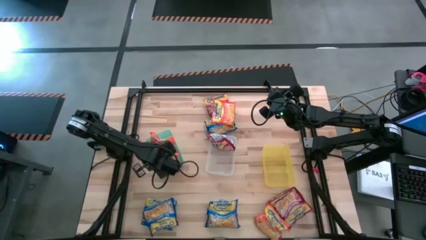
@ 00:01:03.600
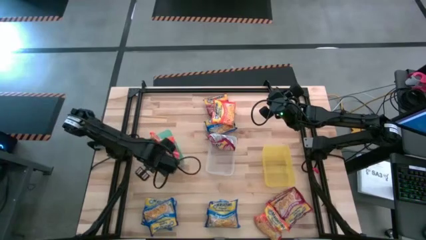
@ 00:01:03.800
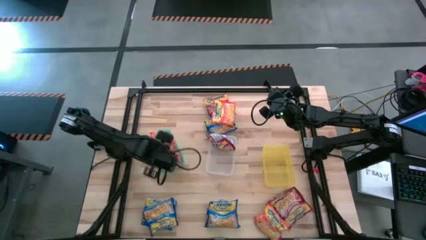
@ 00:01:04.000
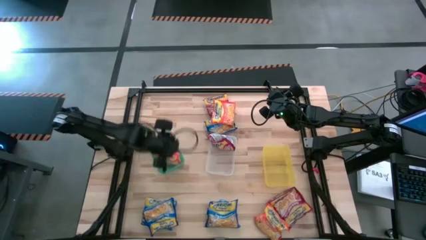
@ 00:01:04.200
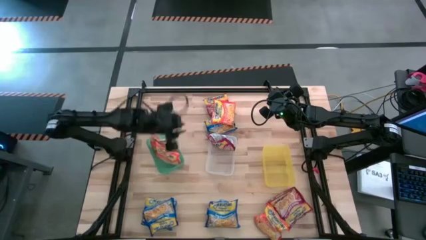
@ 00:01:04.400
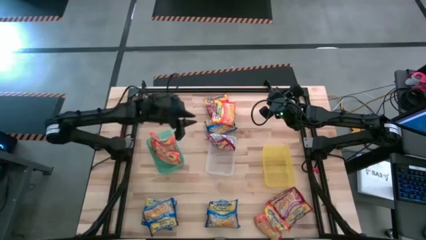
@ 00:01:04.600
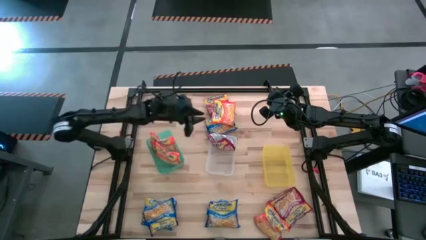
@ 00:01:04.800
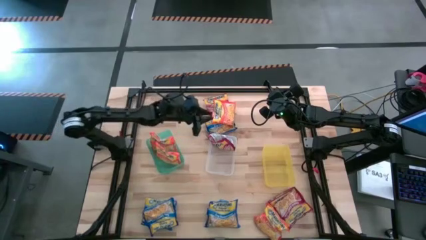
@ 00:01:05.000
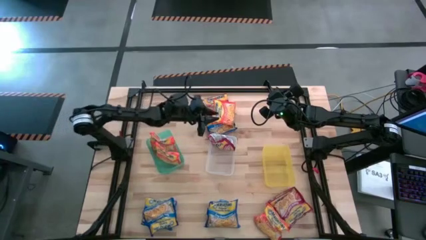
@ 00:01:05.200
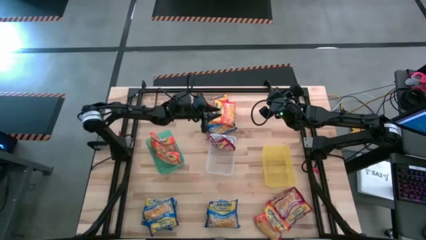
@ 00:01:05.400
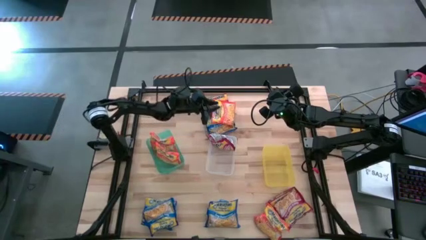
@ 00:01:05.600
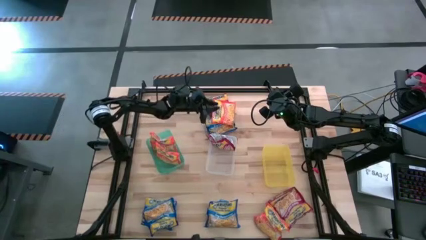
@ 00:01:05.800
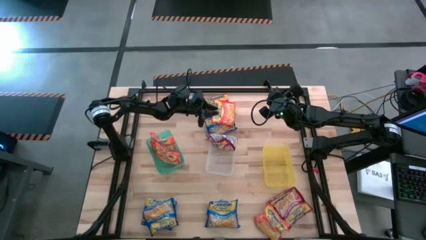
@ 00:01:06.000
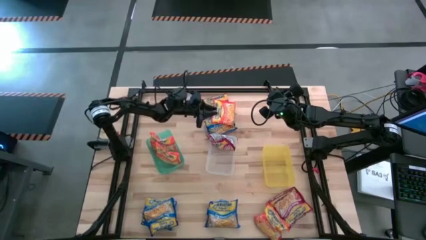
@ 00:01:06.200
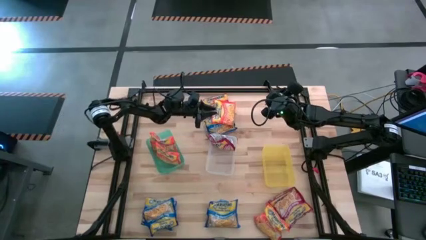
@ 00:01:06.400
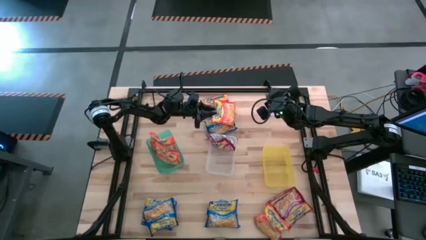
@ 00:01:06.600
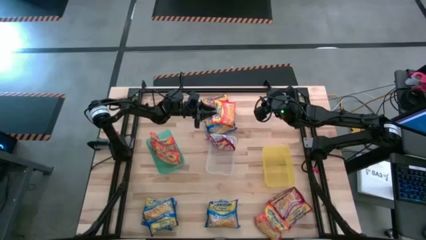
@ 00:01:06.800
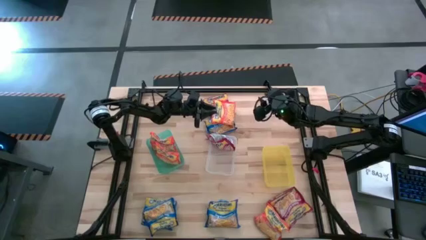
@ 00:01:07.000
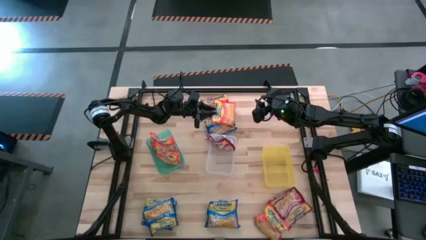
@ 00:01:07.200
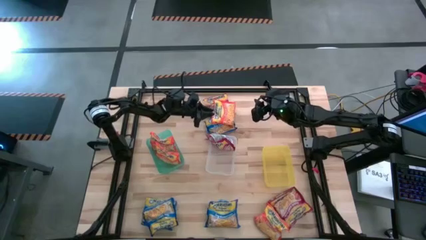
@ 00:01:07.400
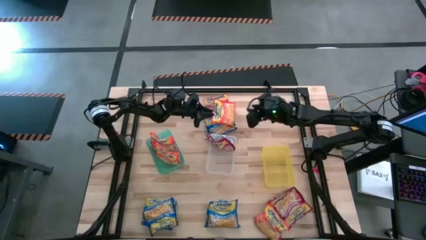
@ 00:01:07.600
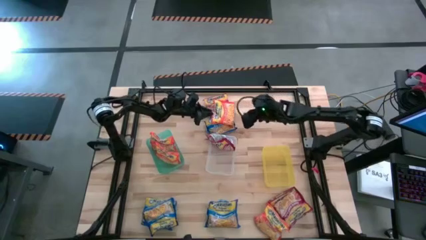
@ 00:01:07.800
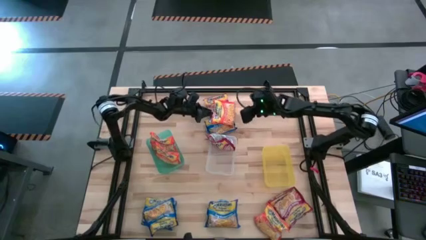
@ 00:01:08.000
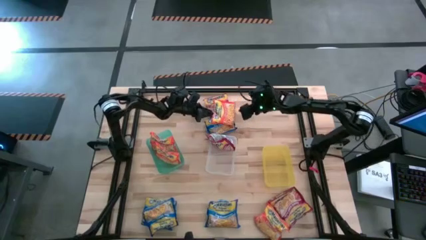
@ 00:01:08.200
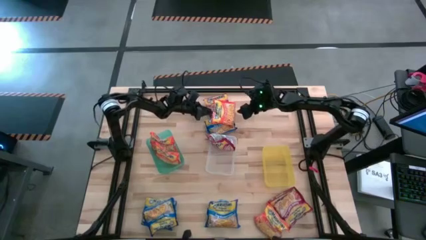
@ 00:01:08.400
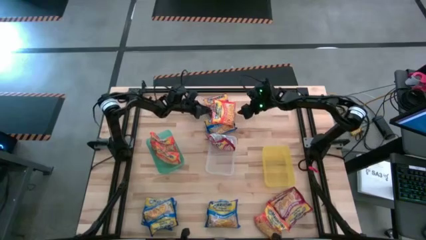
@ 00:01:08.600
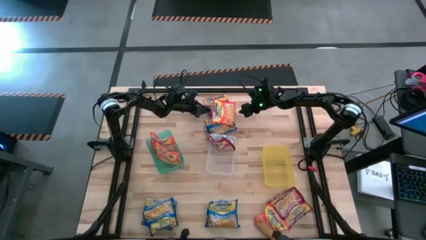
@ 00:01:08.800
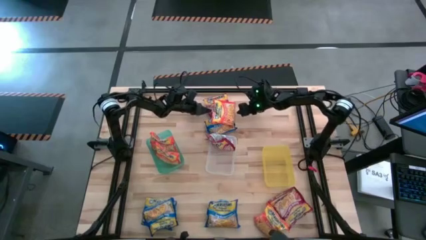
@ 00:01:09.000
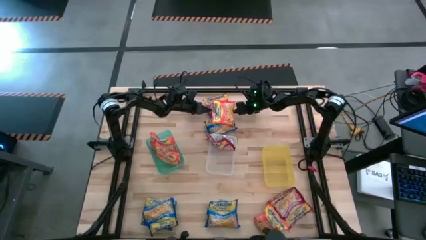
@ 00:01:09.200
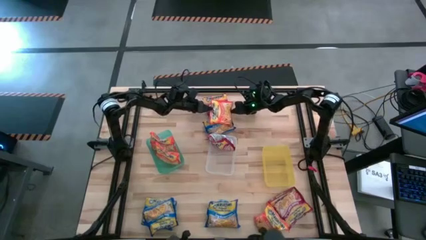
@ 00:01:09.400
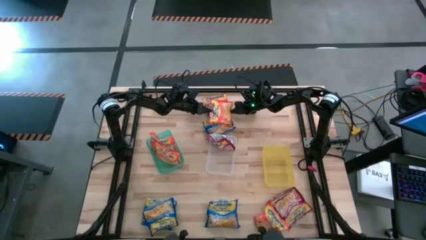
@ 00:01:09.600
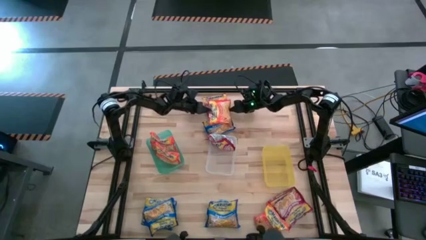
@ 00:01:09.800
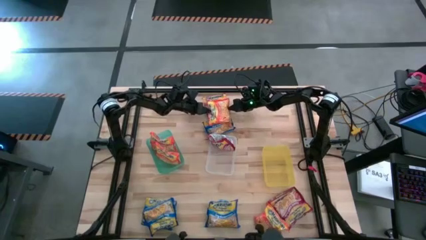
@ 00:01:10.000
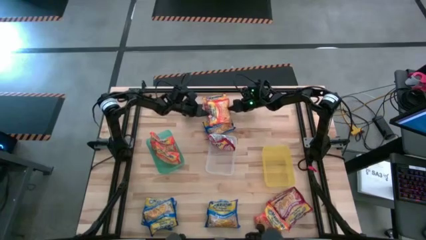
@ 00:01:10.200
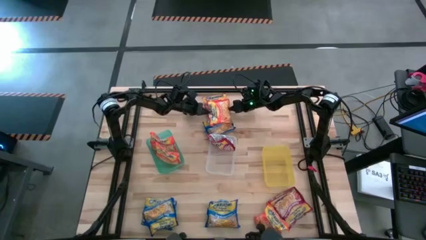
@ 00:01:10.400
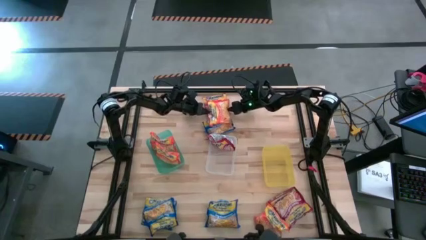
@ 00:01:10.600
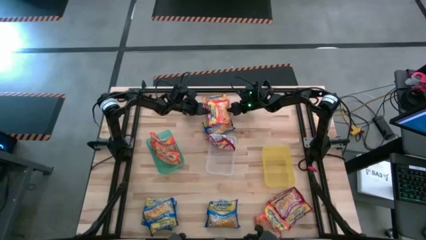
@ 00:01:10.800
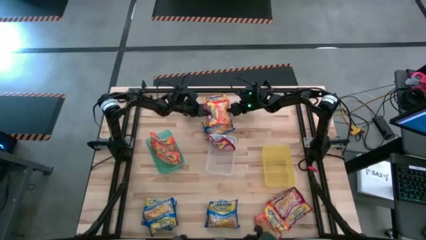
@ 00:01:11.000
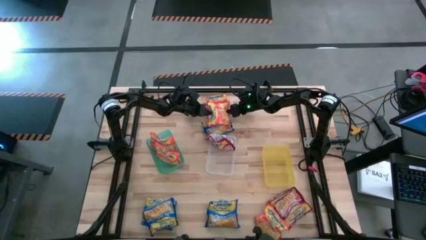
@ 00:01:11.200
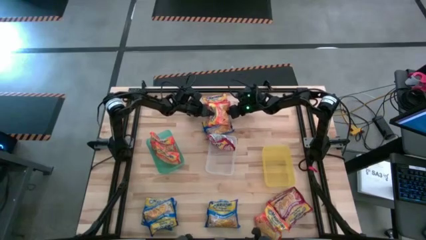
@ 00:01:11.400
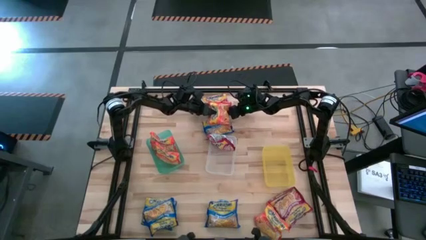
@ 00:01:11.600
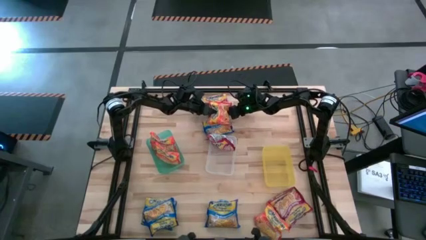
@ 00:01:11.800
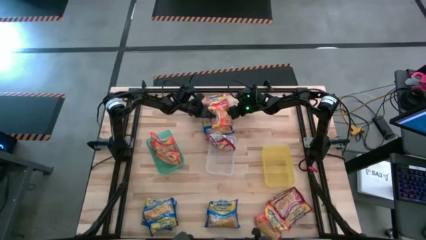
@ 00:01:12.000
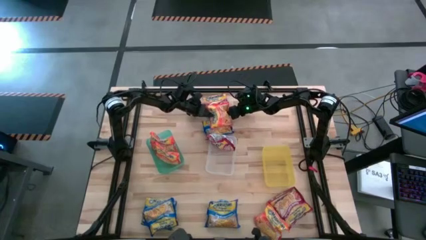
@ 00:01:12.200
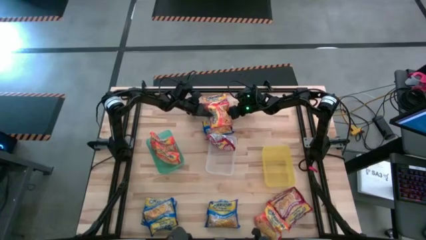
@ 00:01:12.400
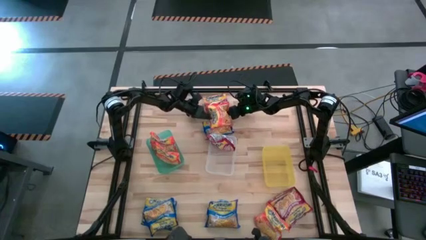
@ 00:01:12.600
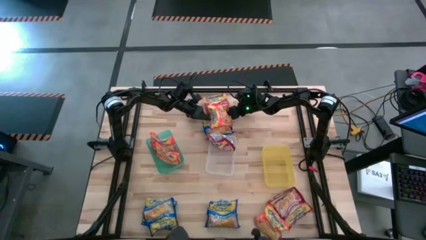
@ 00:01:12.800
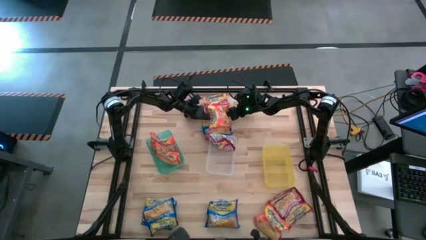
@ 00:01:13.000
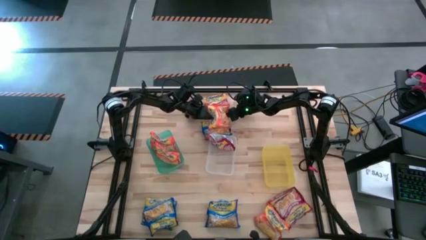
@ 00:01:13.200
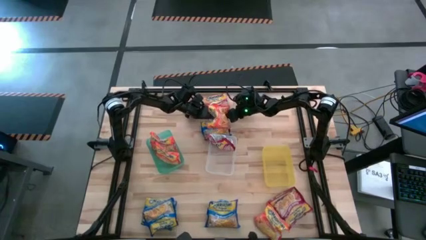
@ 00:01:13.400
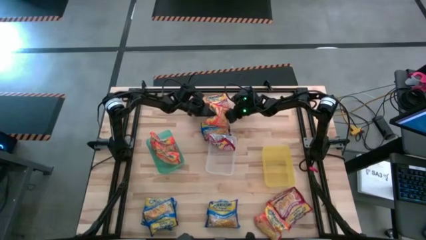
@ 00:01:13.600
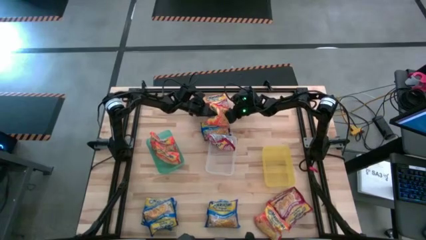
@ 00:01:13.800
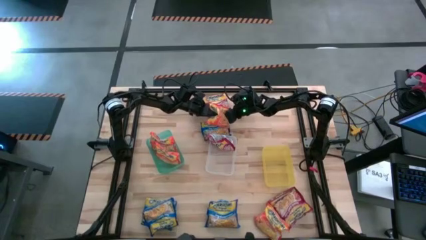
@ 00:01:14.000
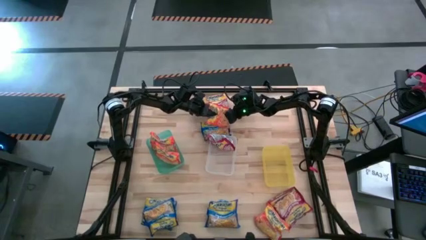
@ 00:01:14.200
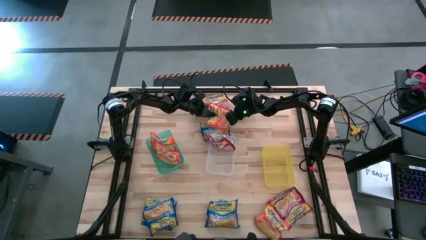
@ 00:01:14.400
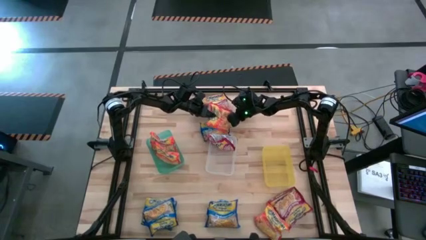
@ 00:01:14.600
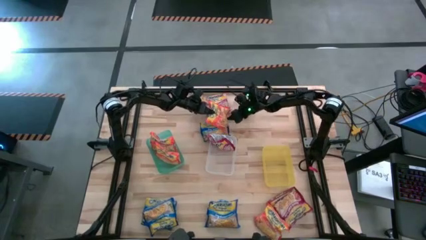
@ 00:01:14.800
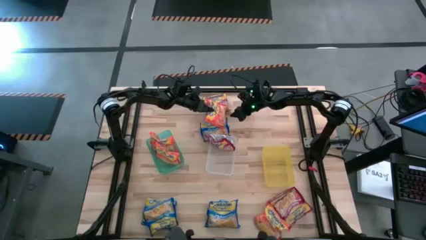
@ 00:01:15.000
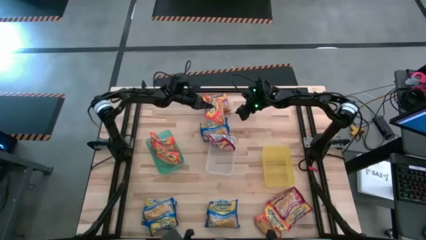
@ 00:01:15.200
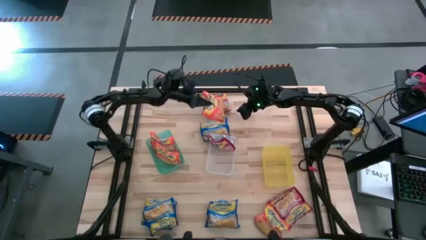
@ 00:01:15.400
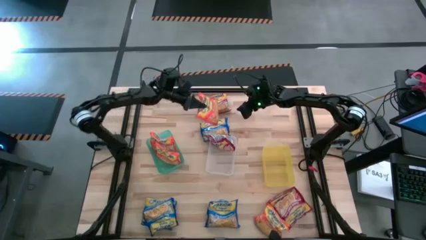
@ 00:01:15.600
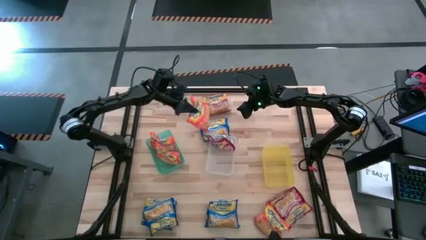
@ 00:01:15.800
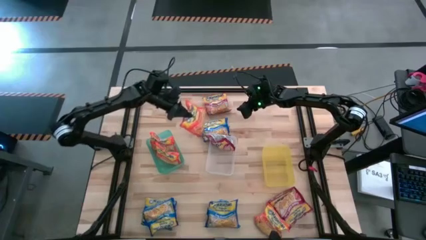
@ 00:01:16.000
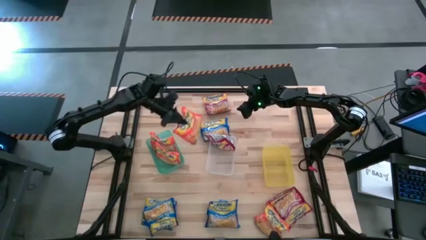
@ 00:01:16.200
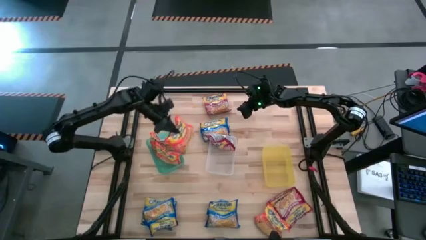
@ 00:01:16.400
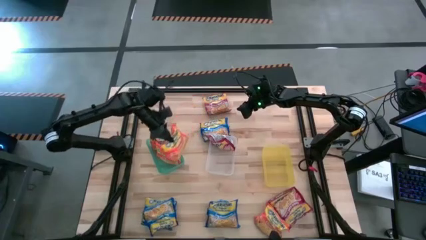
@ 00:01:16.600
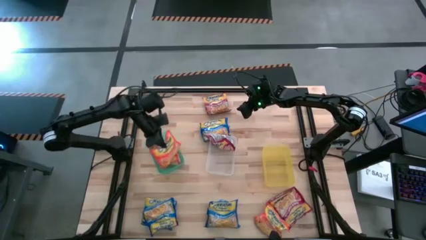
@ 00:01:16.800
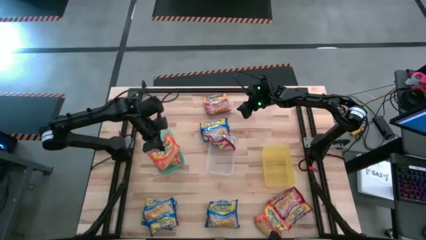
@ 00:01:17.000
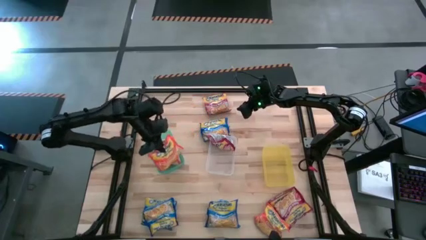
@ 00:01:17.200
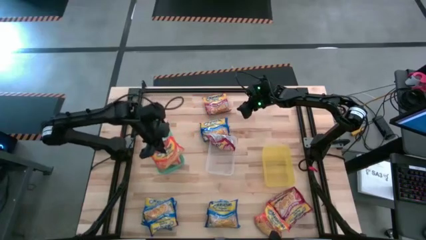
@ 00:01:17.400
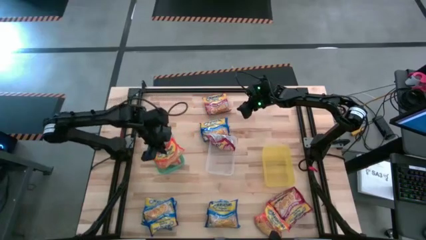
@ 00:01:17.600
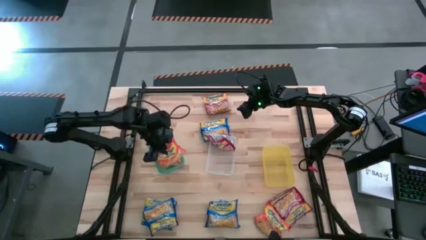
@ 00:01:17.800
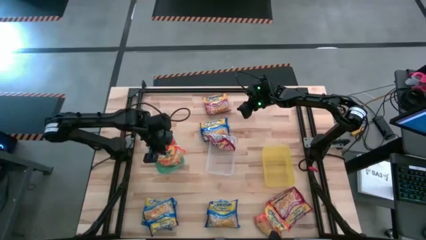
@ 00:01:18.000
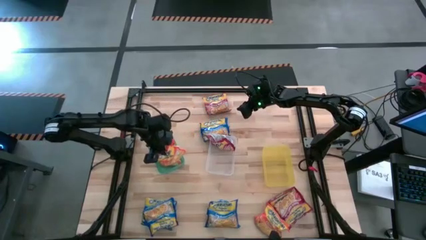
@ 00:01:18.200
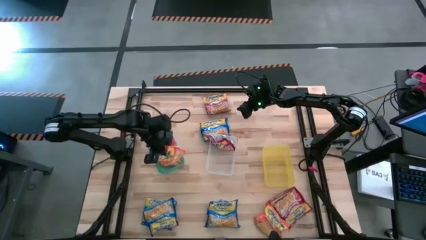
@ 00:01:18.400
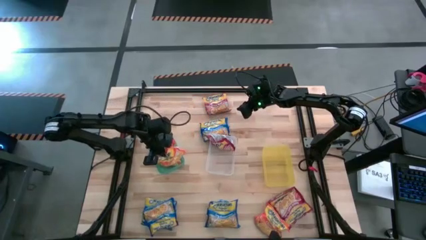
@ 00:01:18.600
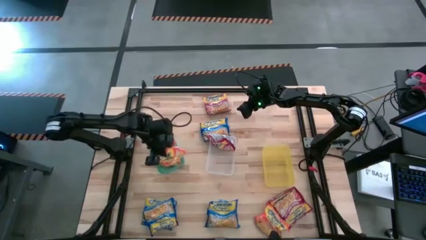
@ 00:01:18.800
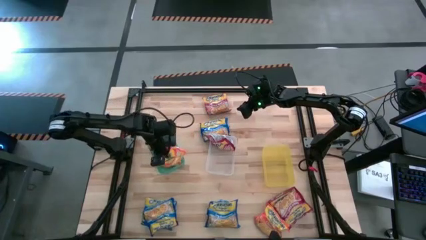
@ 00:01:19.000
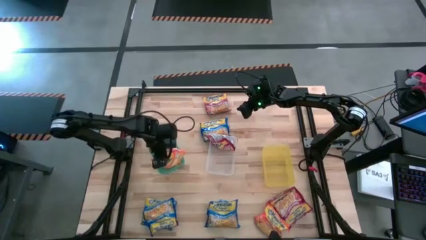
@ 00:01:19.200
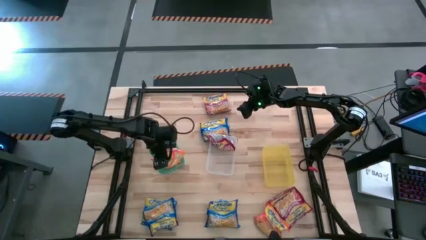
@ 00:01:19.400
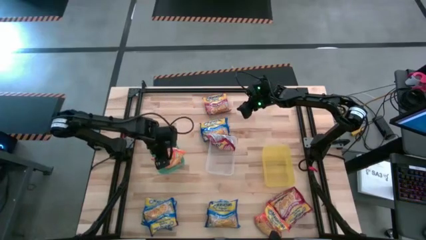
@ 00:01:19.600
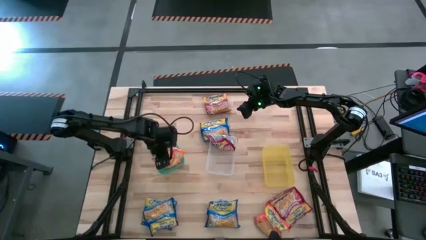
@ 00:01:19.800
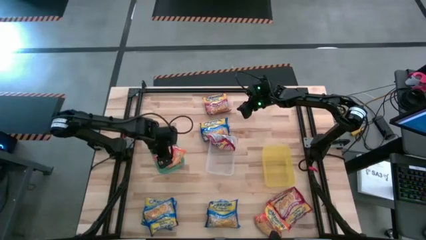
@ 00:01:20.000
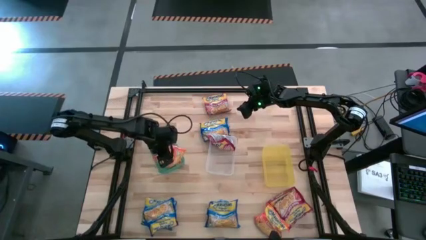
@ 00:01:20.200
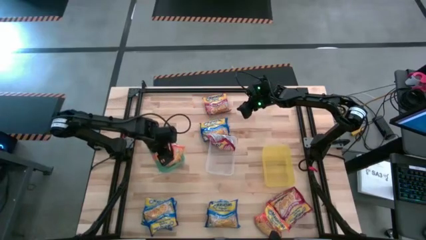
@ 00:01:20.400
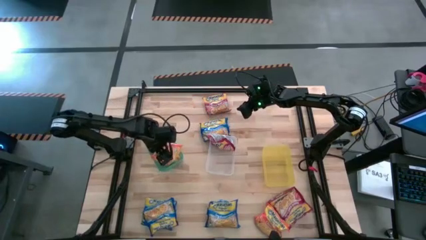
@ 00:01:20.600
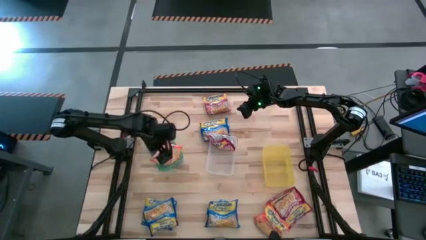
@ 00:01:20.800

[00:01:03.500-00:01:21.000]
Task: Sort Maruchan noodles
Put the orange noodle pack into the green bin
